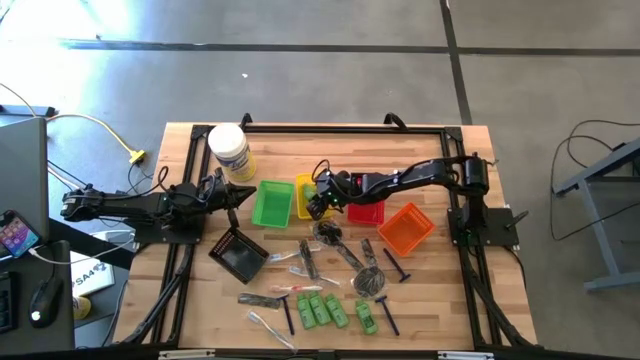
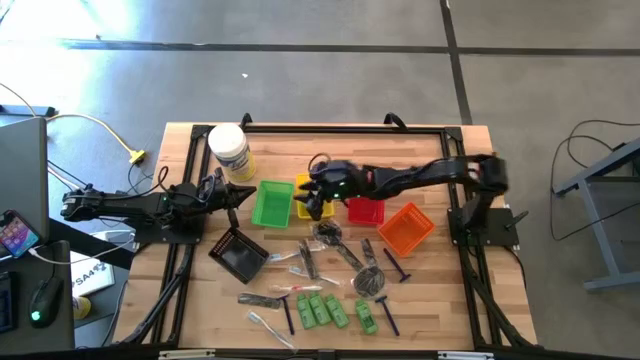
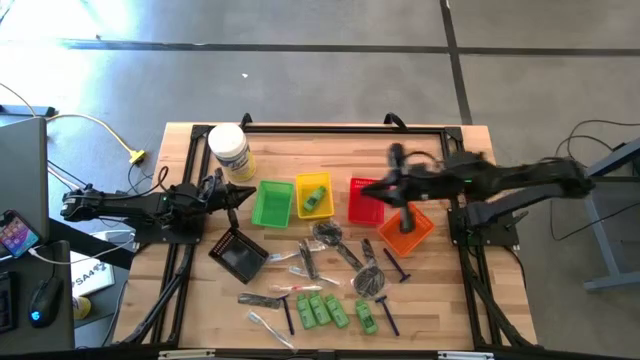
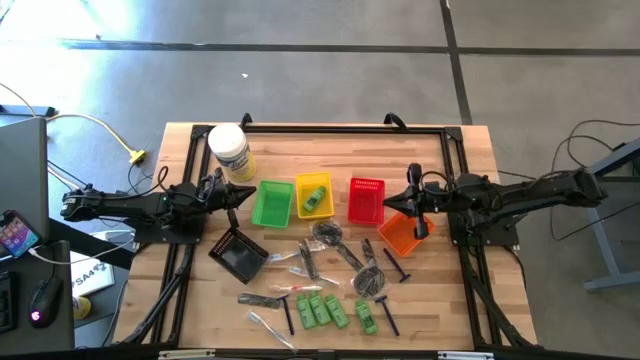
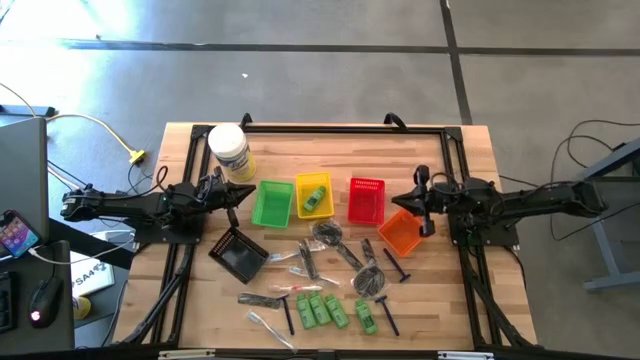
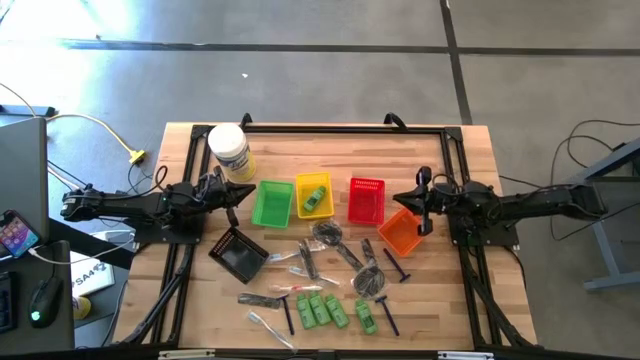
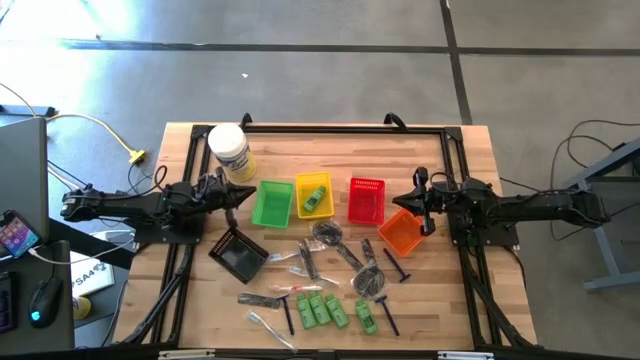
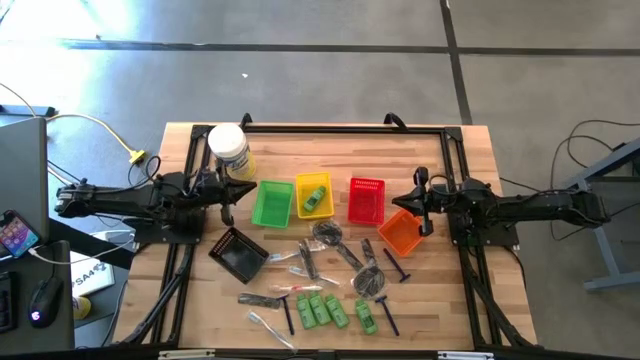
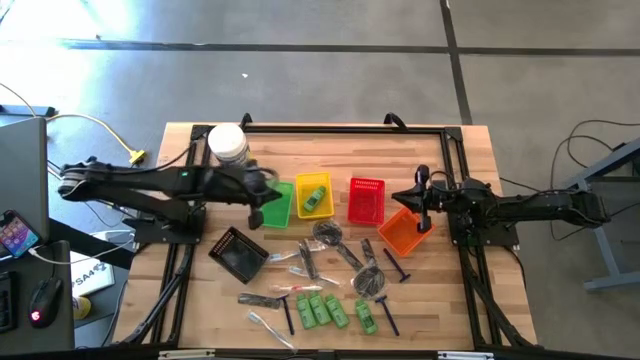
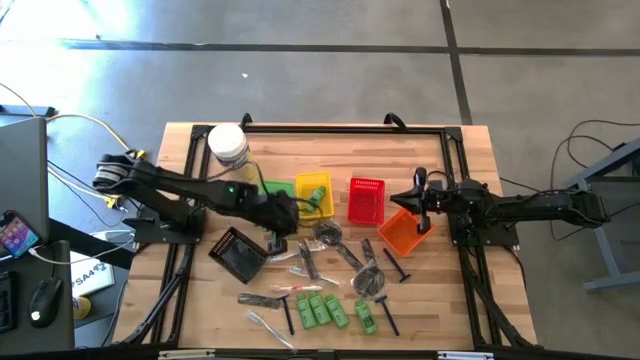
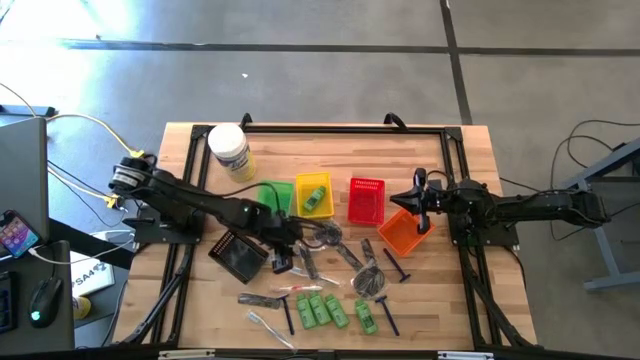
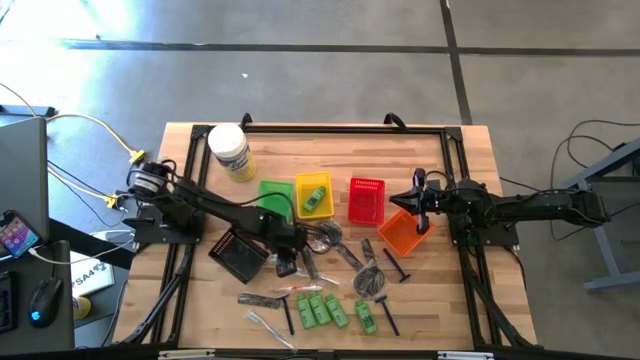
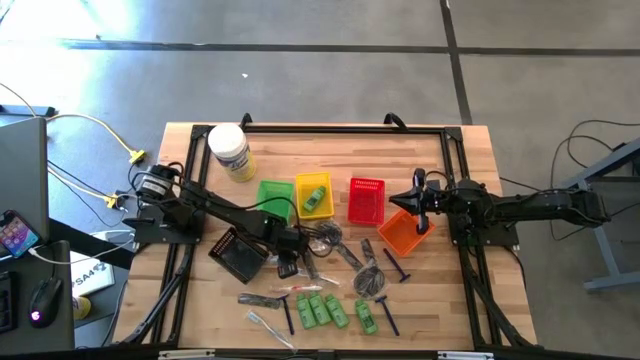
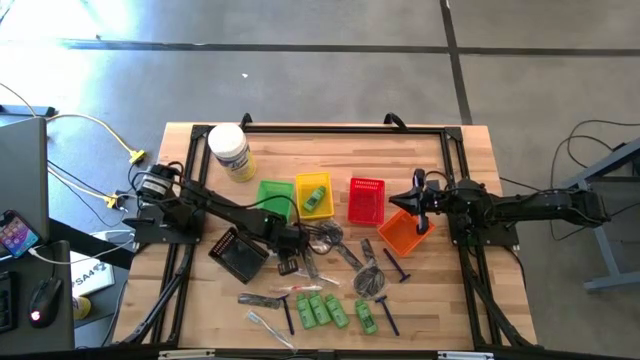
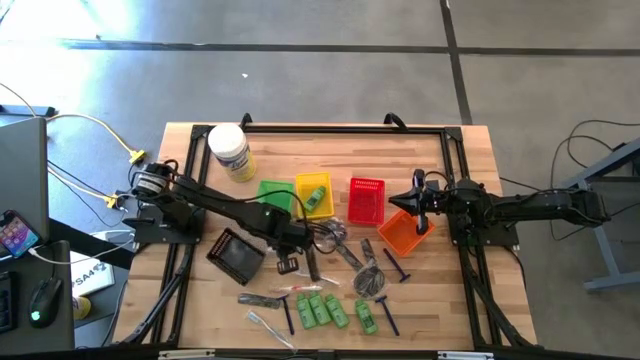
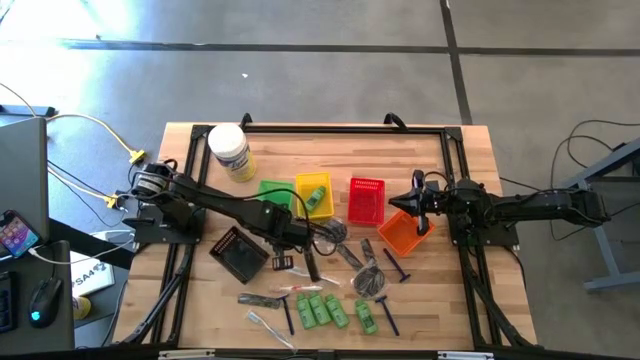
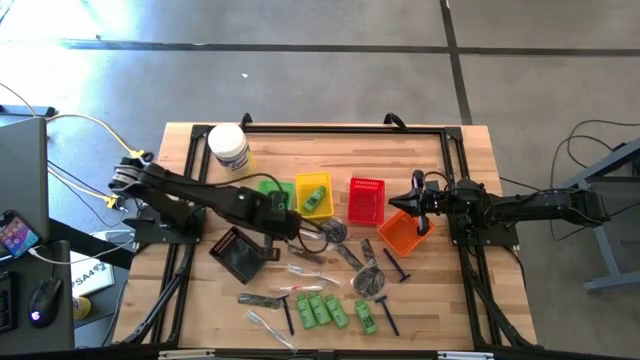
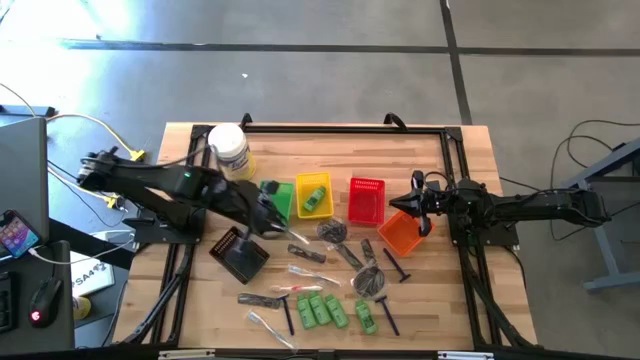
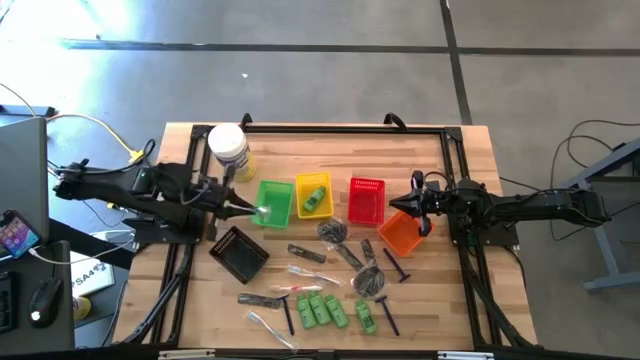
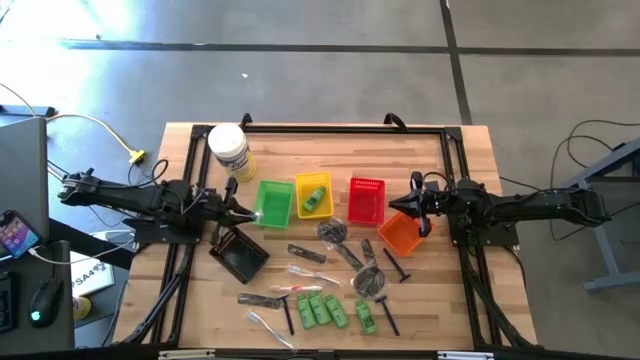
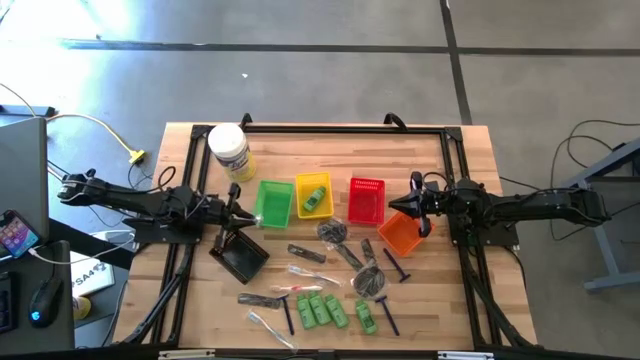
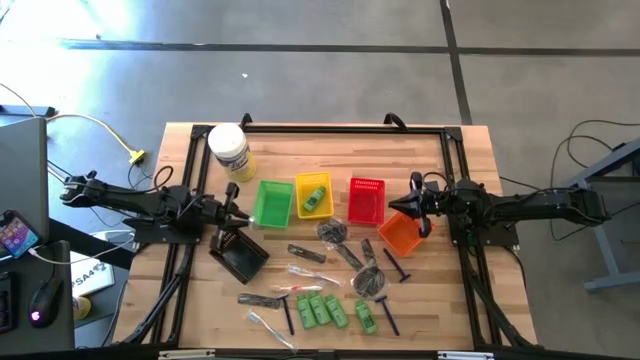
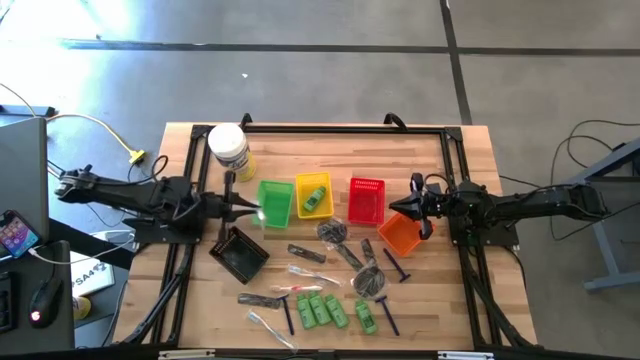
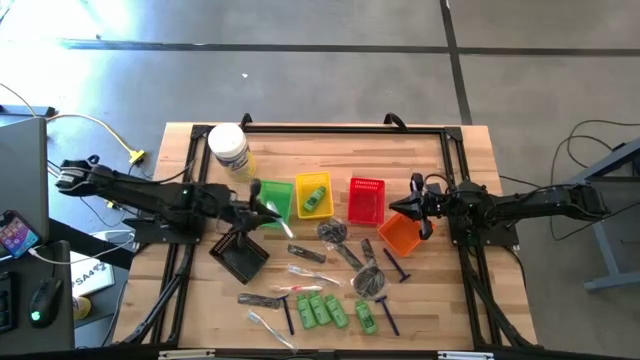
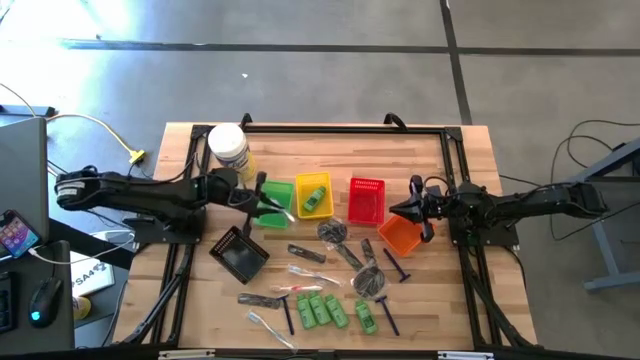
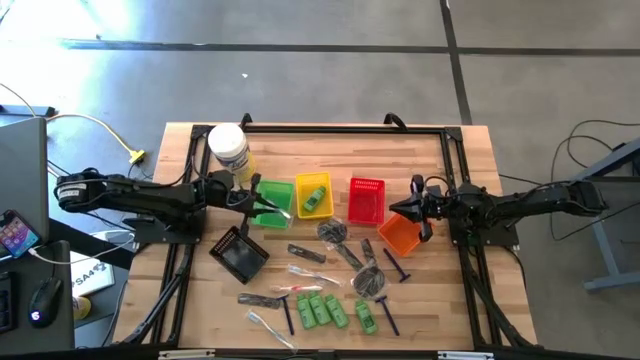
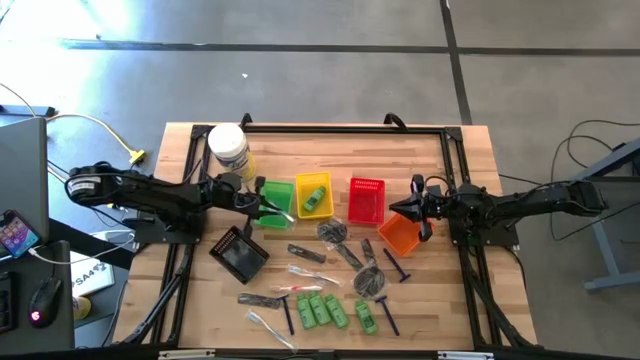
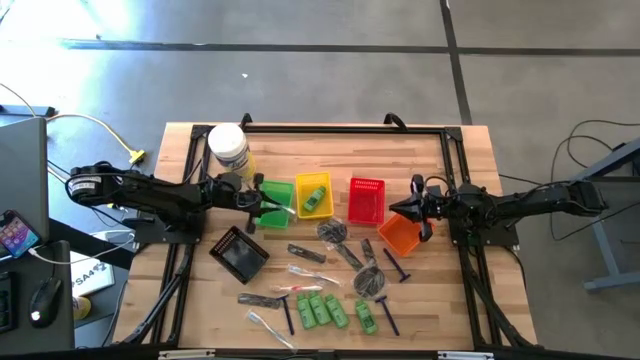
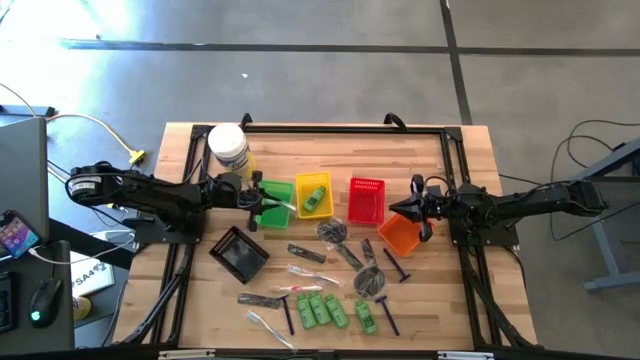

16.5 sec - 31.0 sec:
Task: Pick & Place Travel size toiletries
Put the top blue toothbrush into green basket

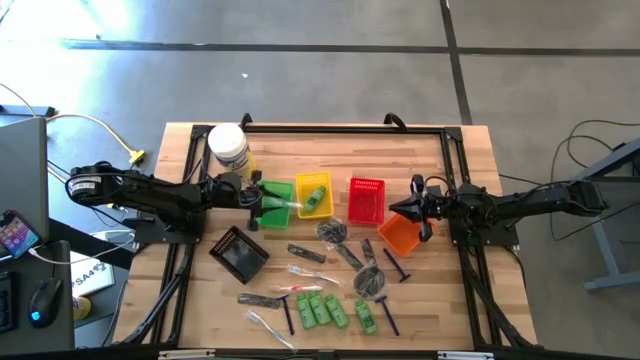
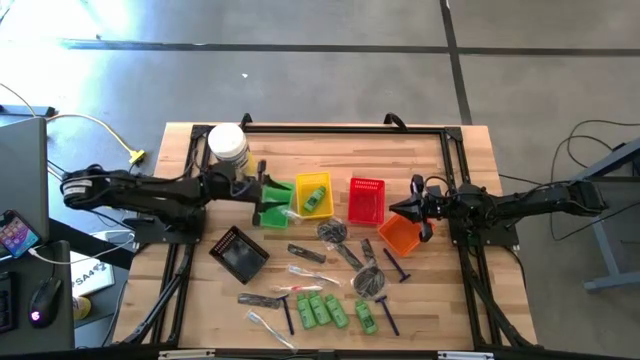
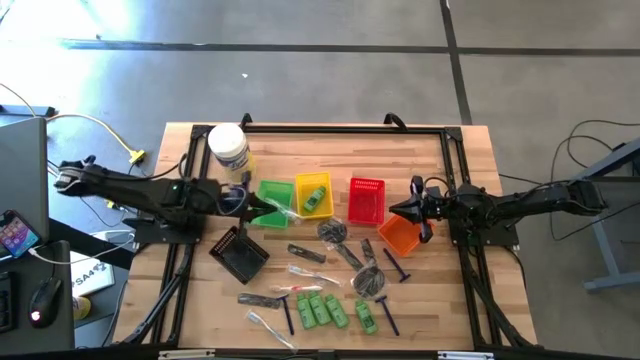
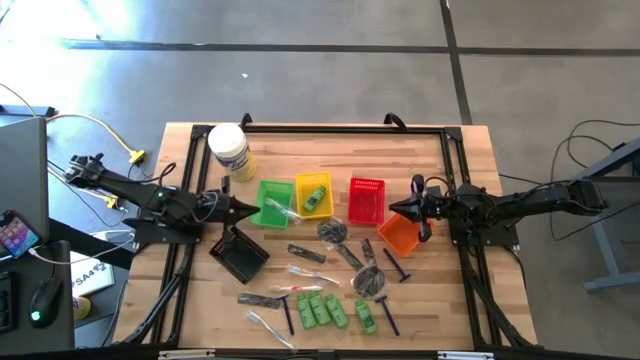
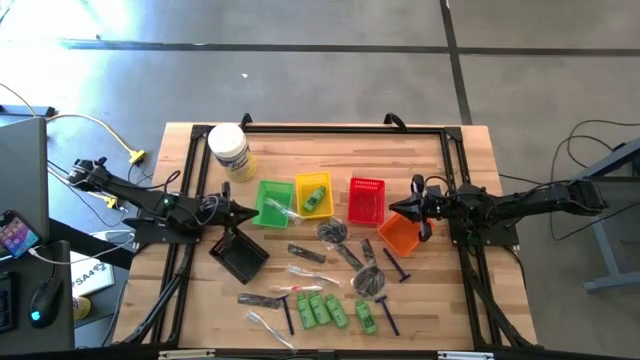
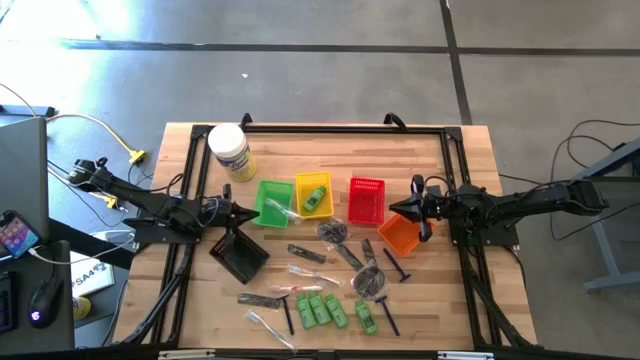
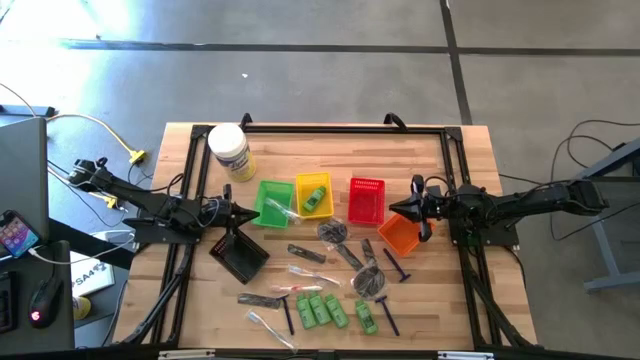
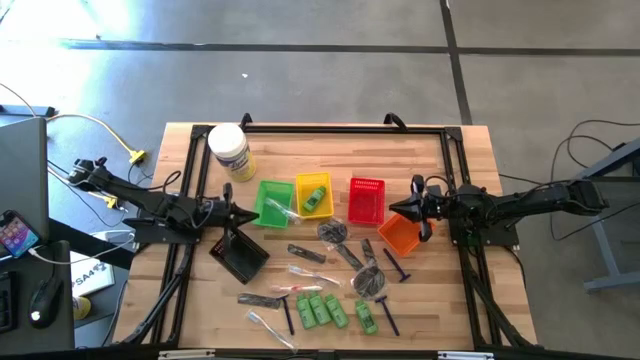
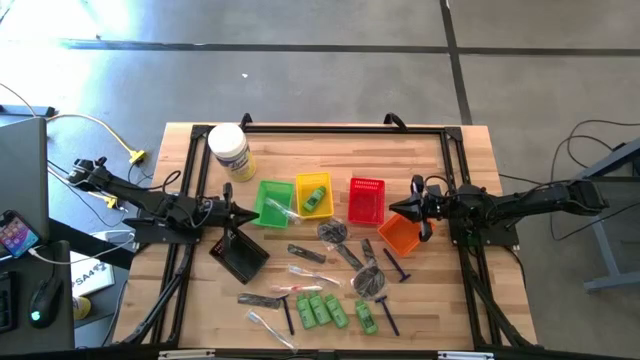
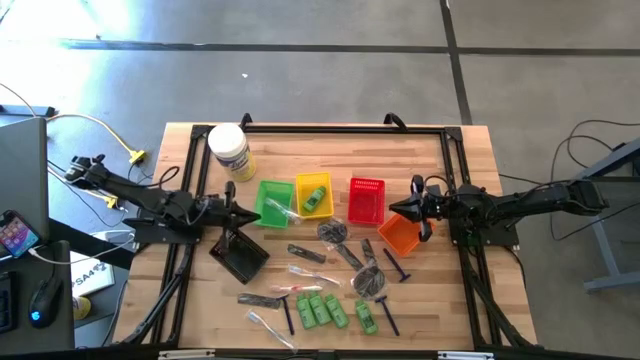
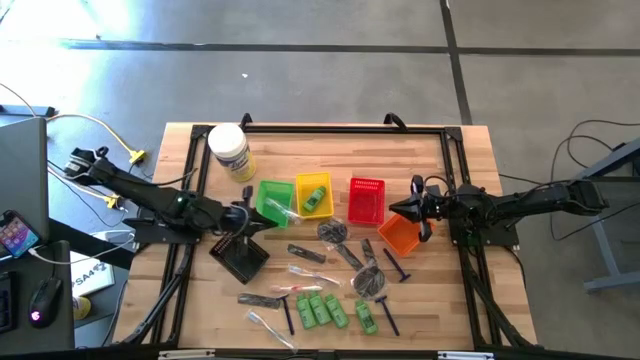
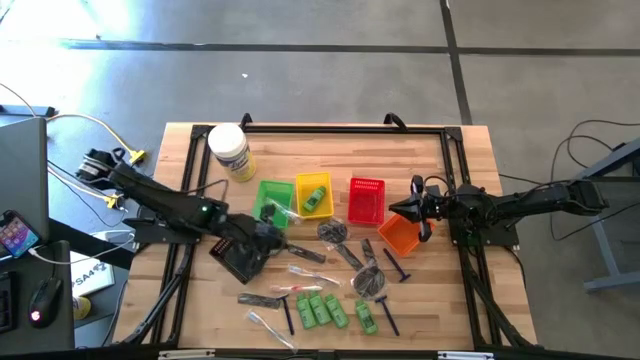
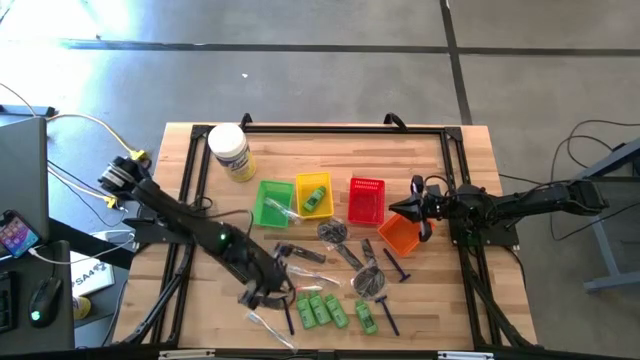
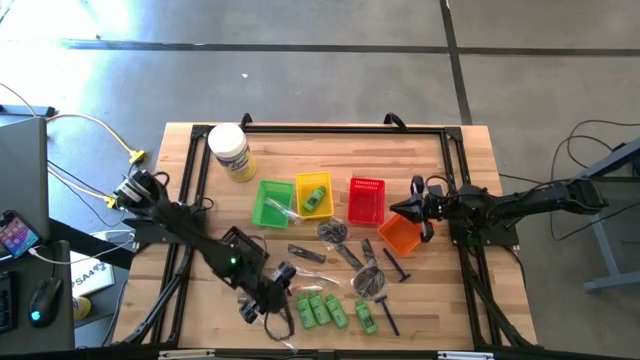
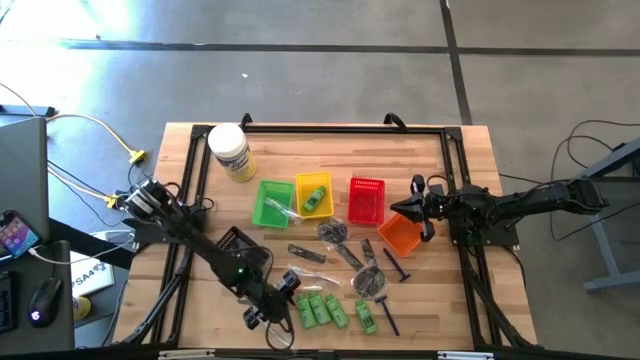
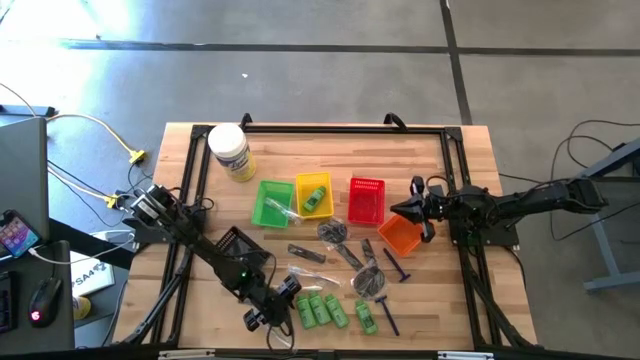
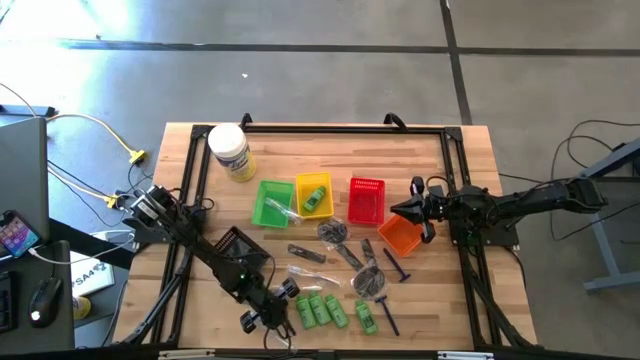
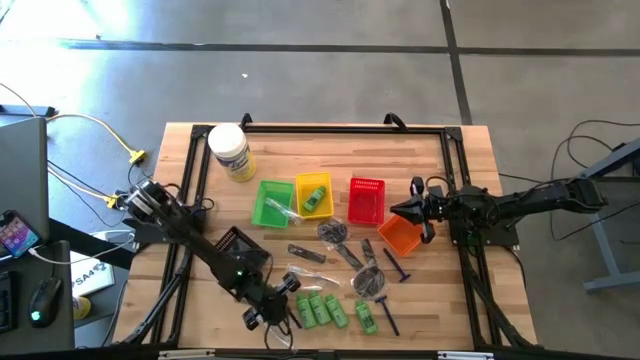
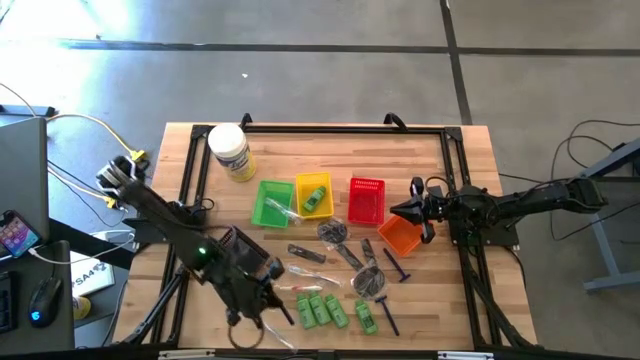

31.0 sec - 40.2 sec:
Put the bottom left blue razor into the black basket
